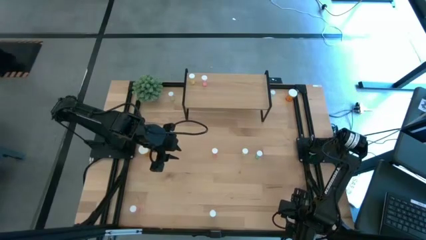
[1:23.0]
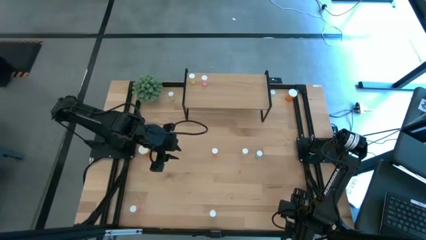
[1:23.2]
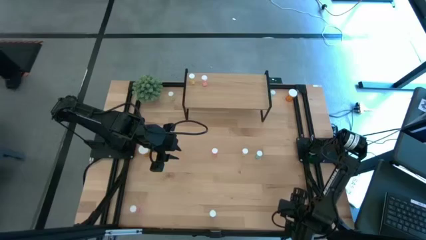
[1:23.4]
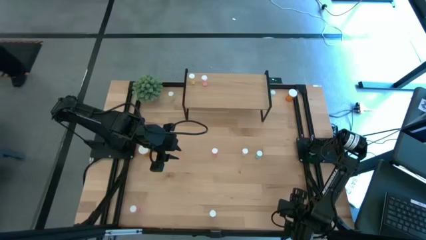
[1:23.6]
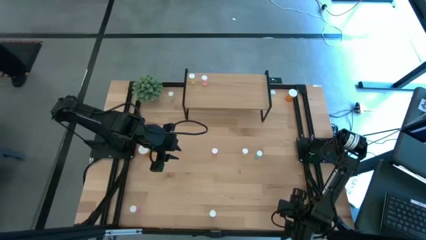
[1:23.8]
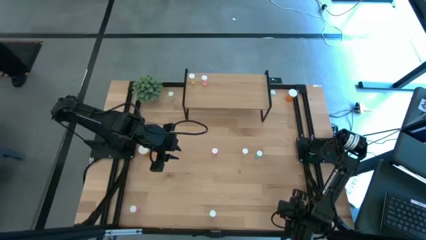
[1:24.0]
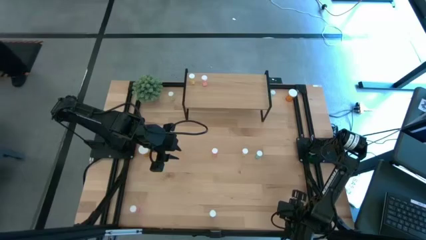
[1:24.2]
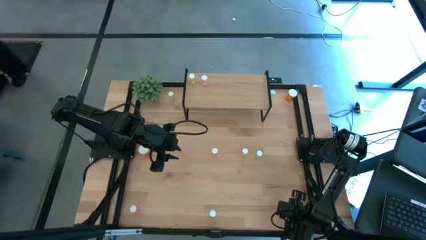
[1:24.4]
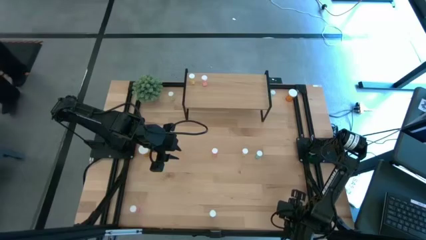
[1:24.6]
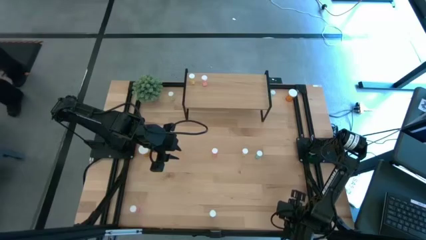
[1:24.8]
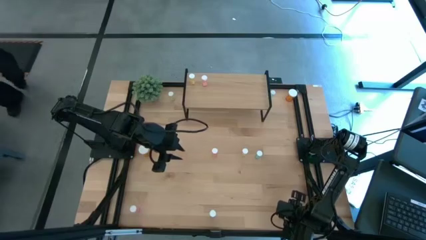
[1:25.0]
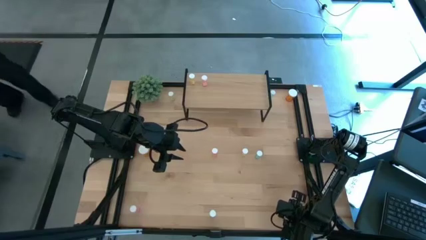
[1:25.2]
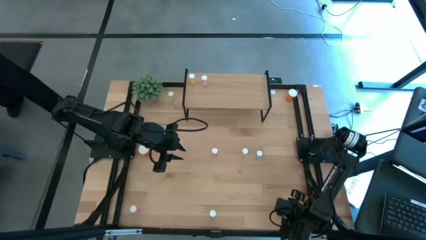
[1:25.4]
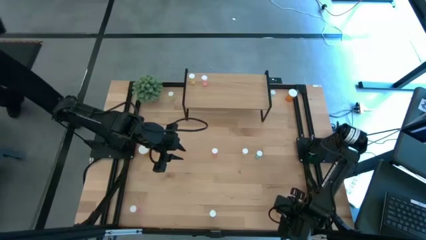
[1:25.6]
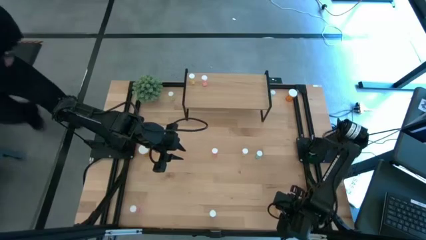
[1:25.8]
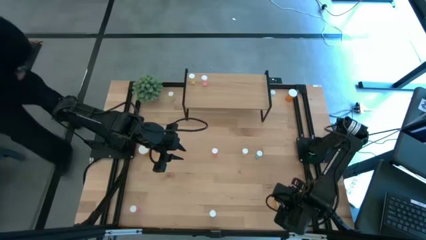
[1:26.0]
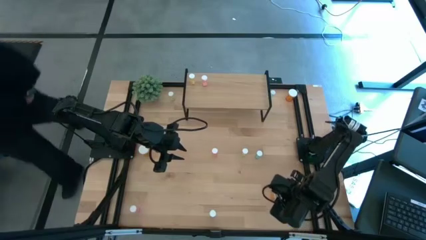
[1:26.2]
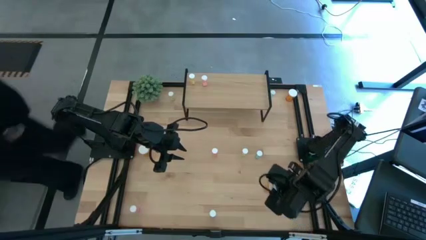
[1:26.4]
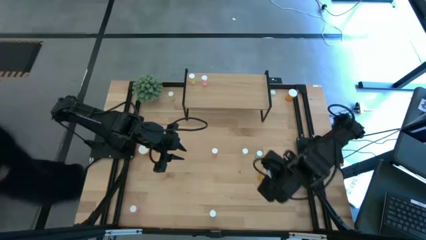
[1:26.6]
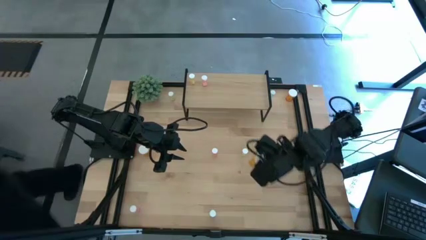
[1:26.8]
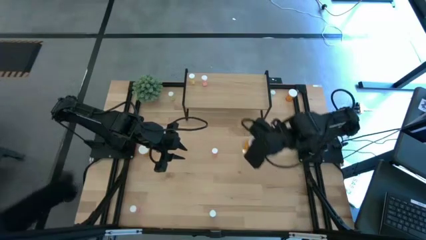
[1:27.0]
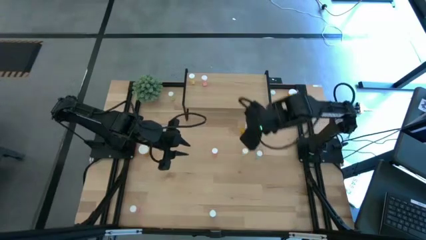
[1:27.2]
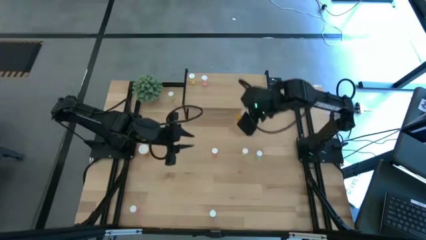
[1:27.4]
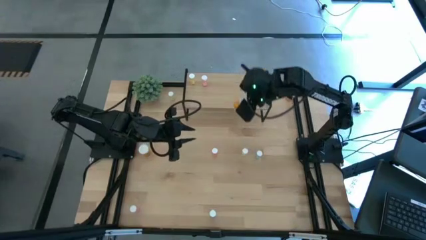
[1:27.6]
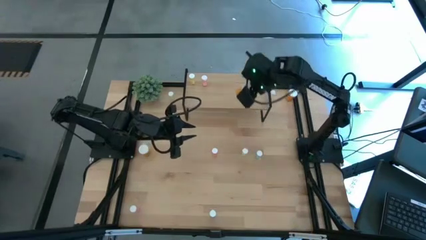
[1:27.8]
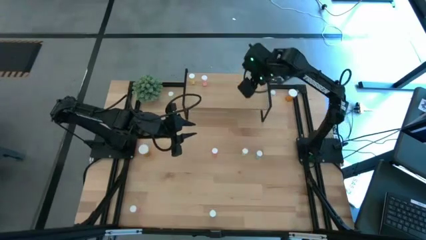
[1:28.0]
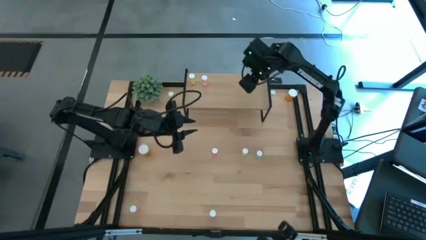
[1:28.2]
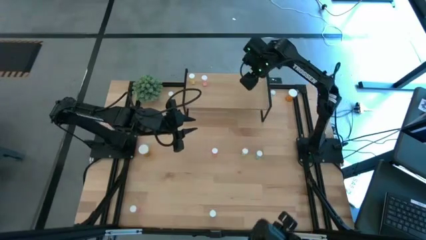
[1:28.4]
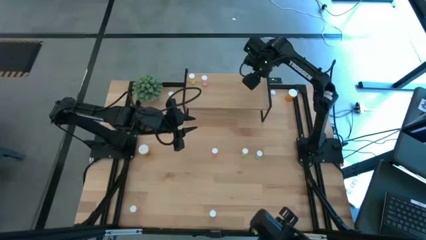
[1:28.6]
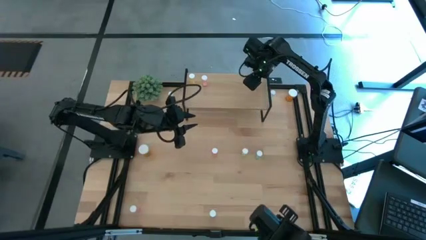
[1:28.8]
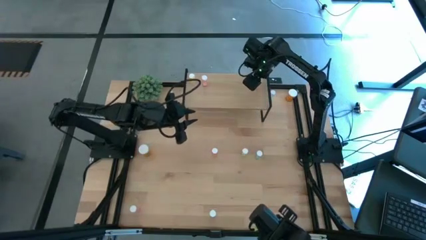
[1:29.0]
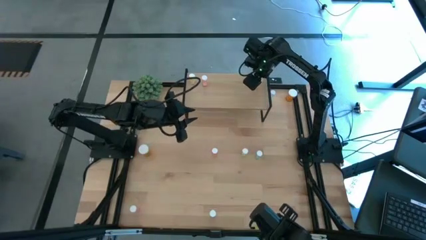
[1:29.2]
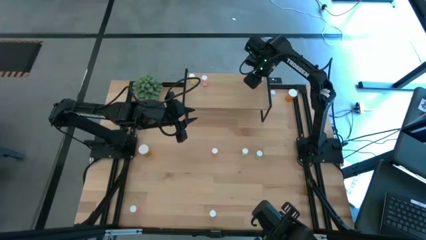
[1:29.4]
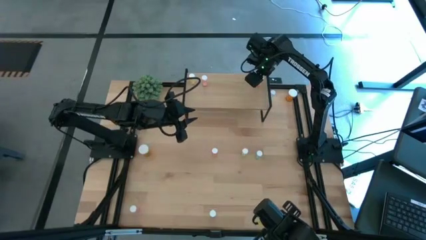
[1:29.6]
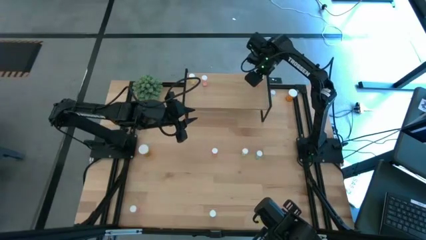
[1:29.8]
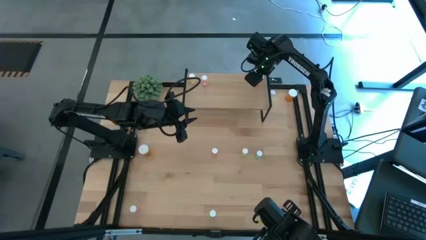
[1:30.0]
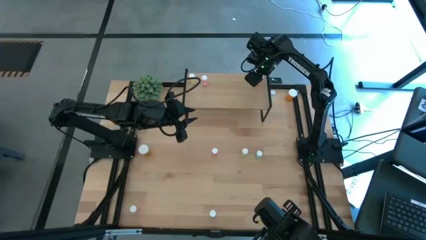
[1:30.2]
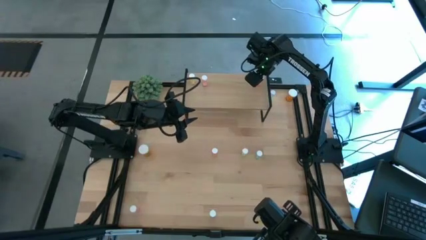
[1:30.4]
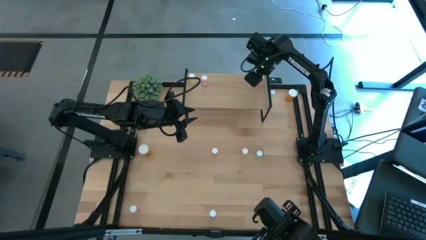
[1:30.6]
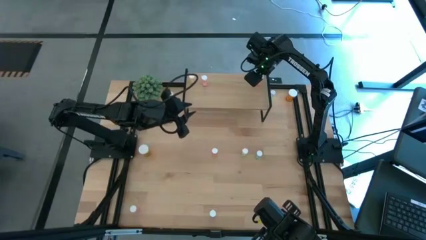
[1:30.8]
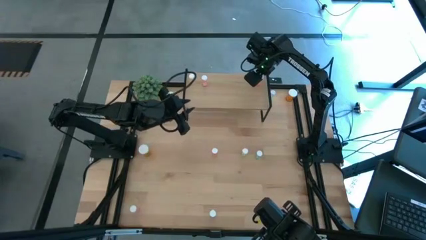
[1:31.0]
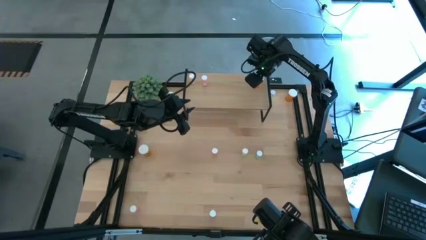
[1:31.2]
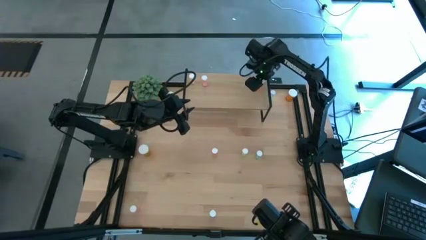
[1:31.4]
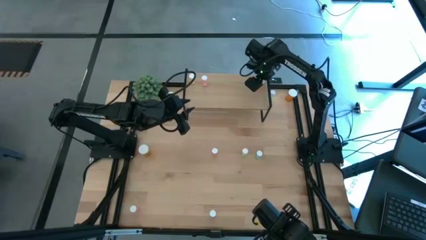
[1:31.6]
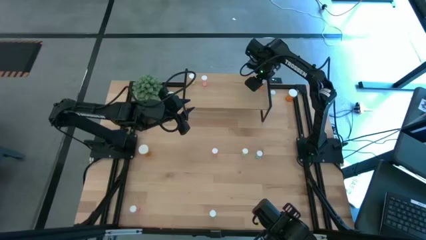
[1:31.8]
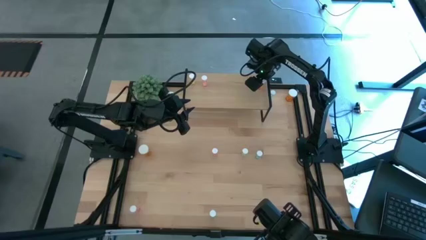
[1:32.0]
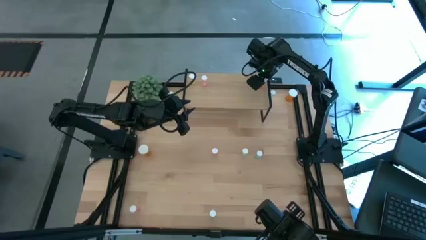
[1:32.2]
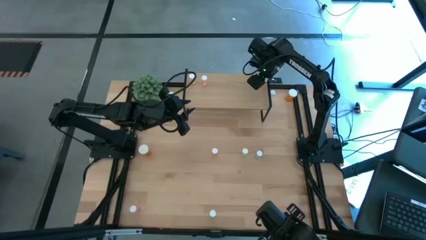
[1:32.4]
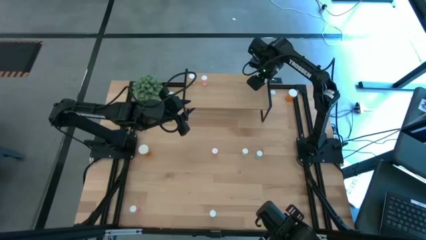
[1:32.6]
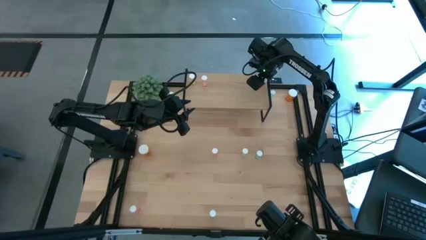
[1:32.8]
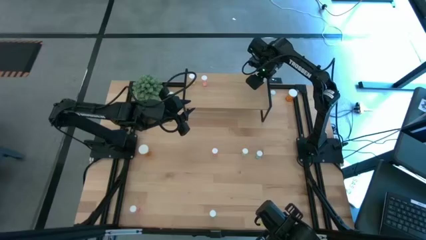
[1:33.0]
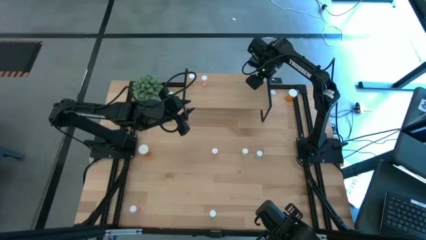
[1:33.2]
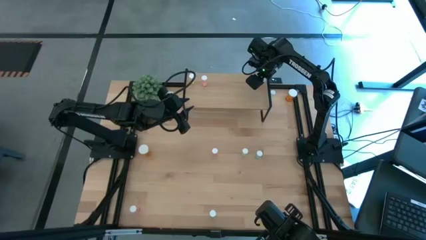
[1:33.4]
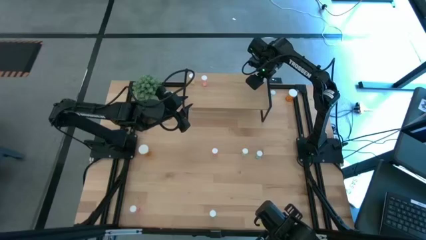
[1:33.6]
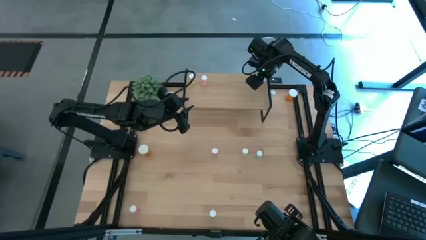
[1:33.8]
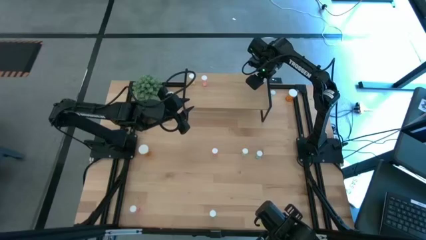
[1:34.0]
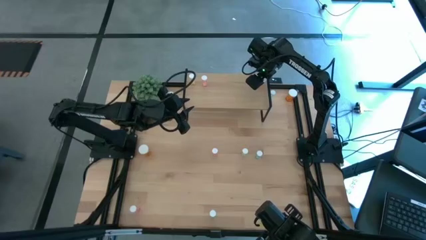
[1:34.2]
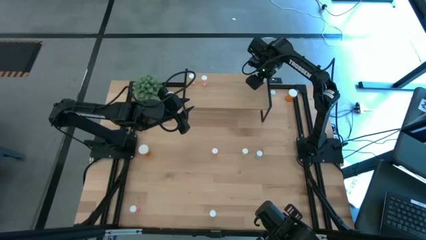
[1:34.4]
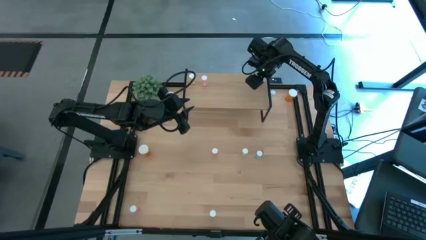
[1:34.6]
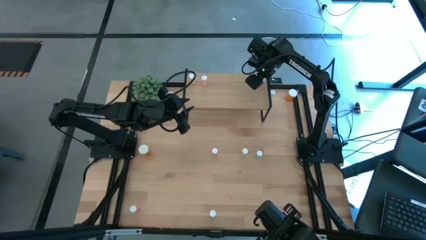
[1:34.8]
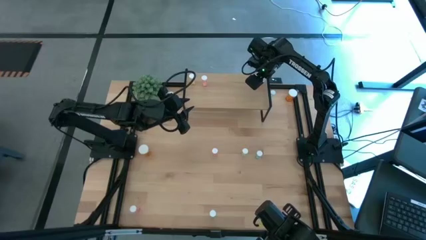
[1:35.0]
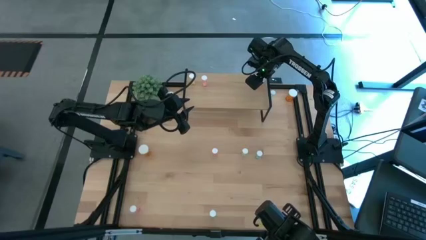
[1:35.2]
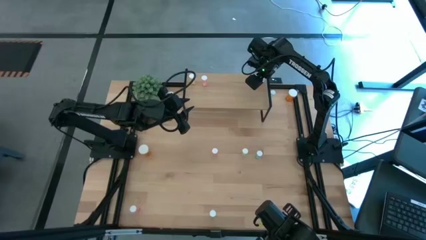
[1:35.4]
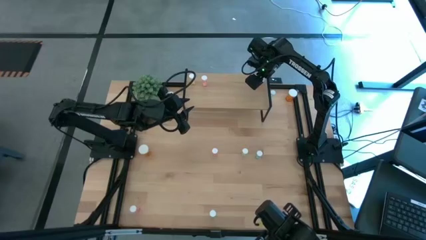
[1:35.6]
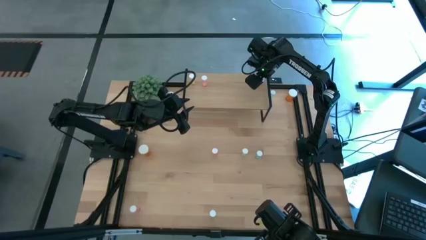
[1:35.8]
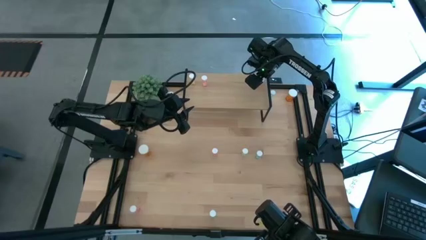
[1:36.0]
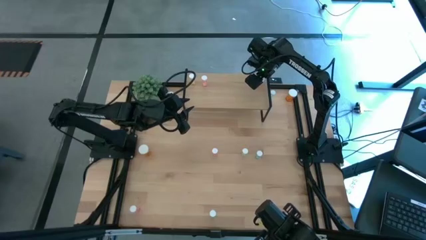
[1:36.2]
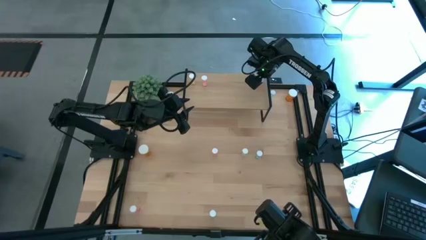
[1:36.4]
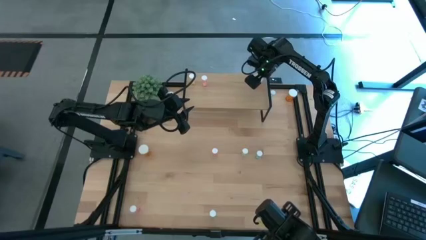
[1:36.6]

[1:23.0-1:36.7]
Task: Pick and place medicine bottles onto shelf by color
Put the bottom orange pill bottle on the shelf

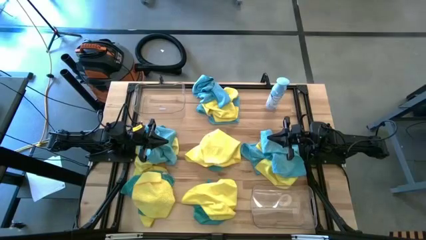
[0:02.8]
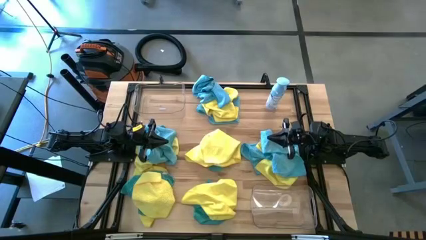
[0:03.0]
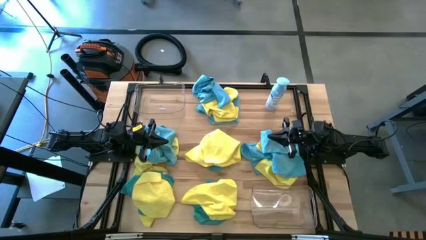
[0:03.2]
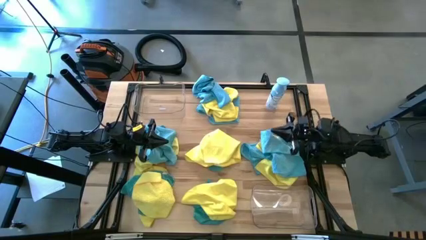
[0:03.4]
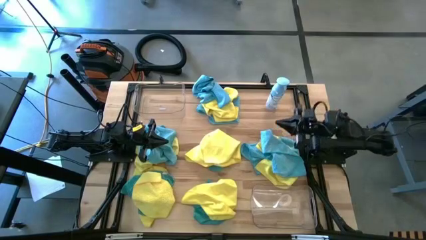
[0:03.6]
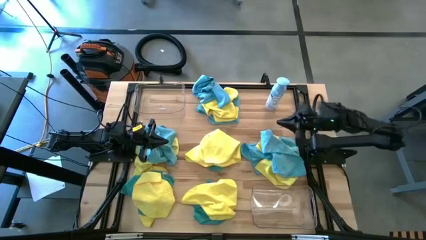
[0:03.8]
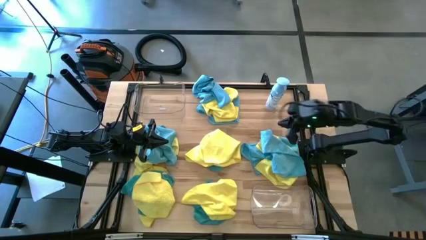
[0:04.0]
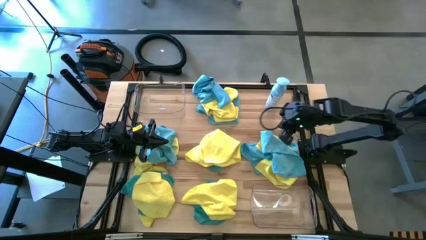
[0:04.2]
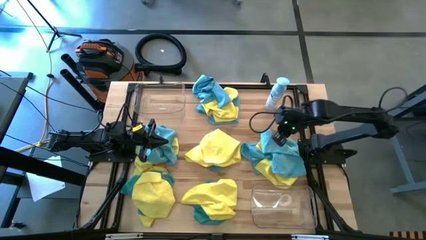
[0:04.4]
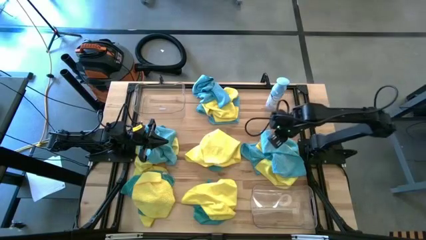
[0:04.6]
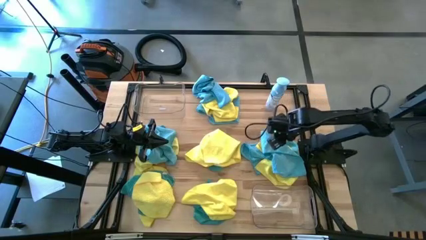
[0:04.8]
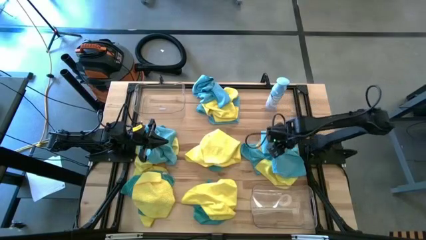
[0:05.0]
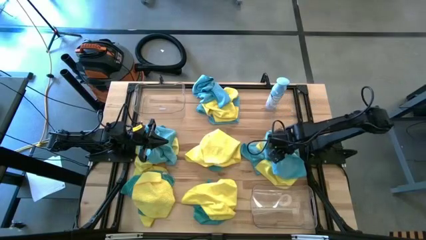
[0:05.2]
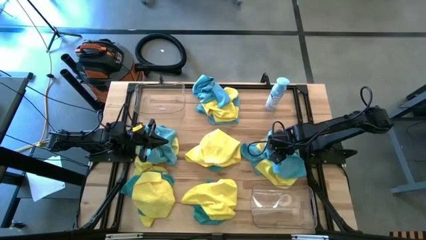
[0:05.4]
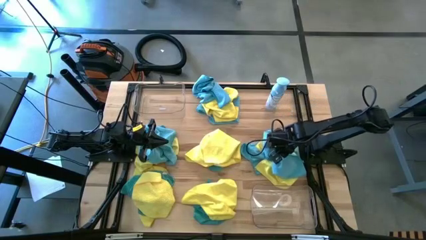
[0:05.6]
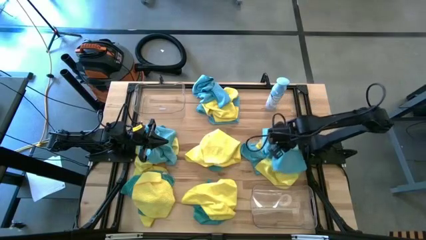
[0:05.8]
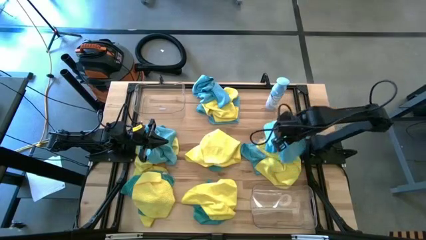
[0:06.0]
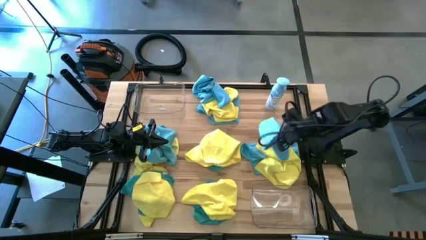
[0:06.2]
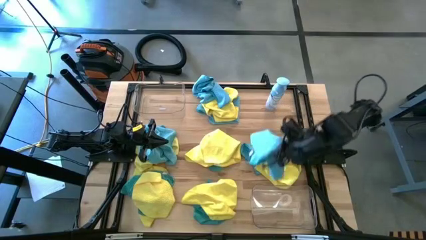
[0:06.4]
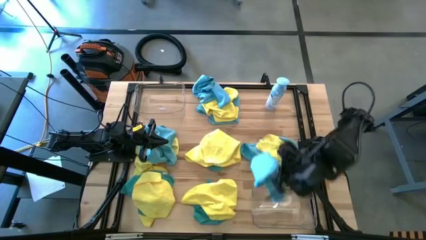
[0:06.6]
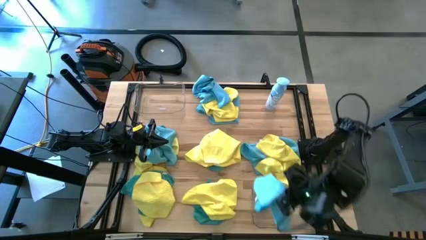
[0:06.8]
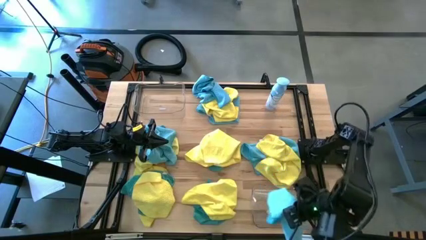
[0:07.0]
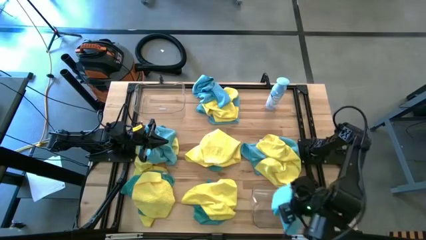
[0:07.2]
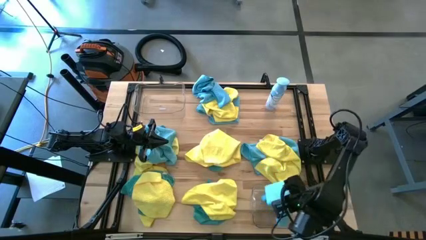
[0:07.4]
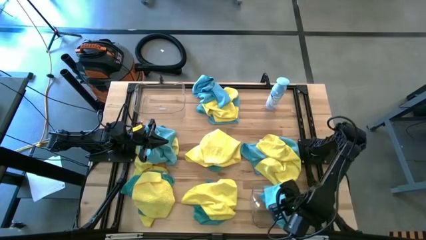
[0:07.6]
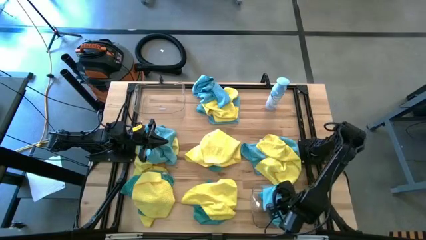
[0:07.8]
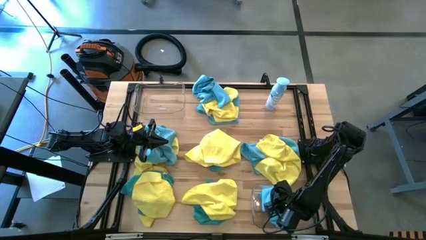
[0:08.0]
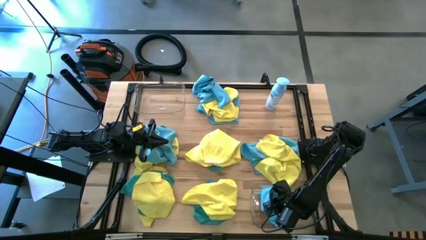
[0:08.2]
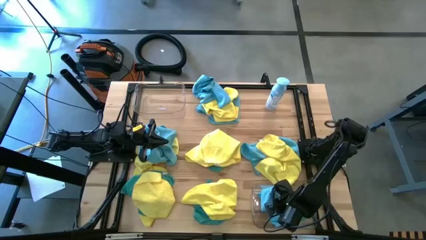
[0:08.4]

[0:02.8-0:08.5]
Task: Sort microfiber towel by color & place in baskets
Put the blue towel into the bottom transparent bin
